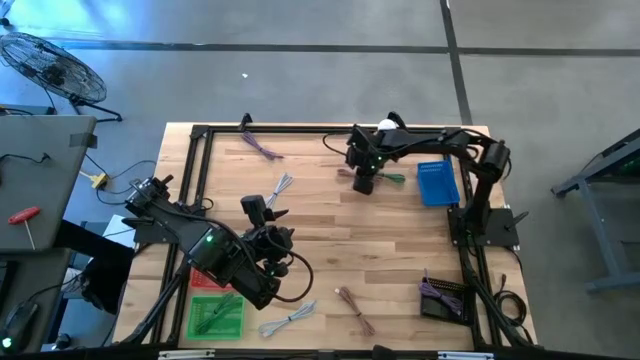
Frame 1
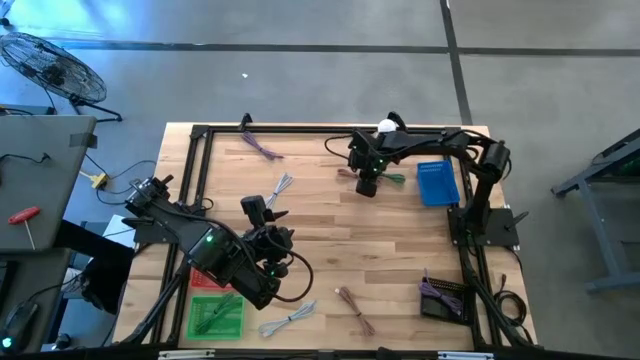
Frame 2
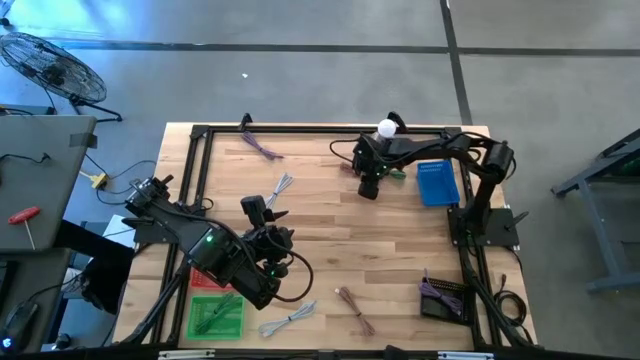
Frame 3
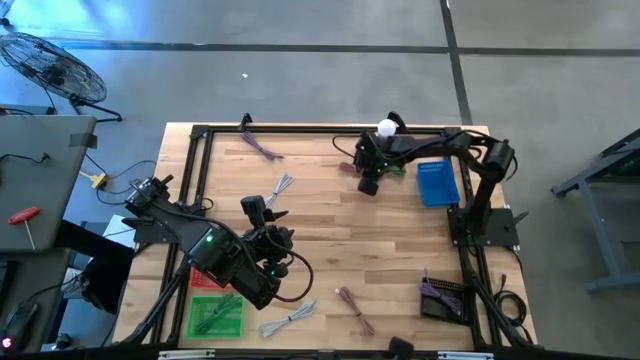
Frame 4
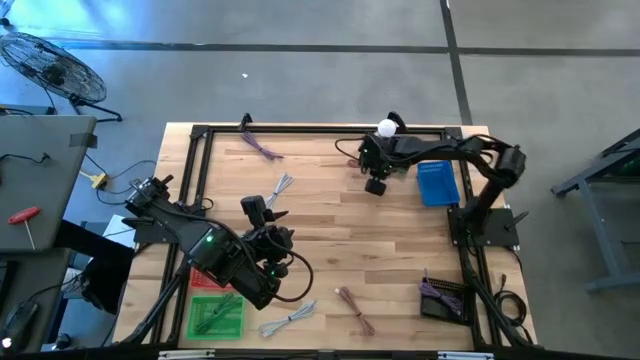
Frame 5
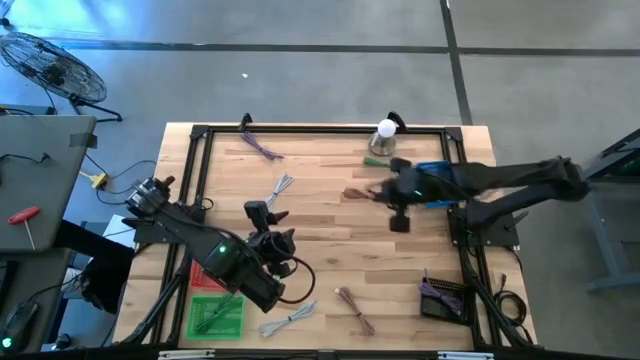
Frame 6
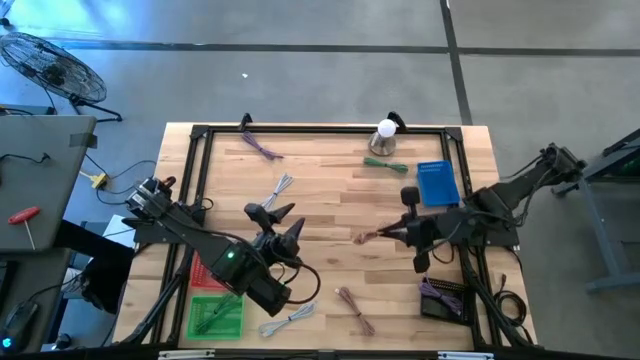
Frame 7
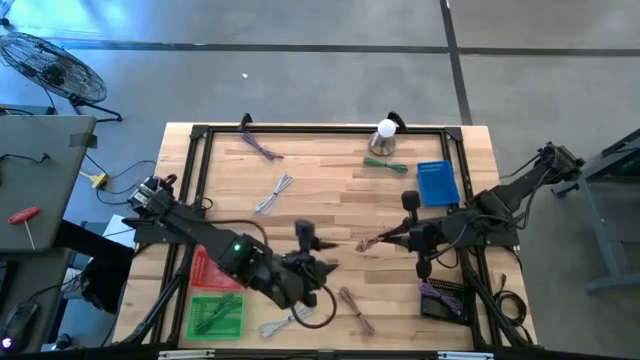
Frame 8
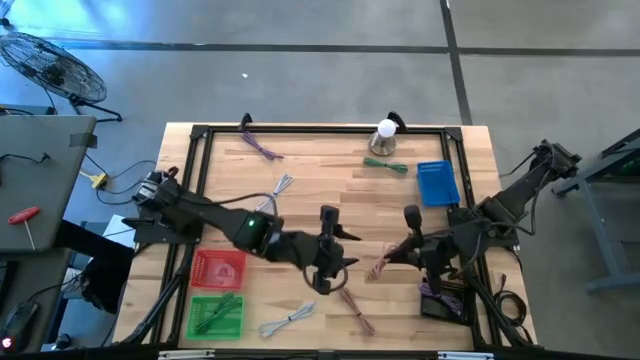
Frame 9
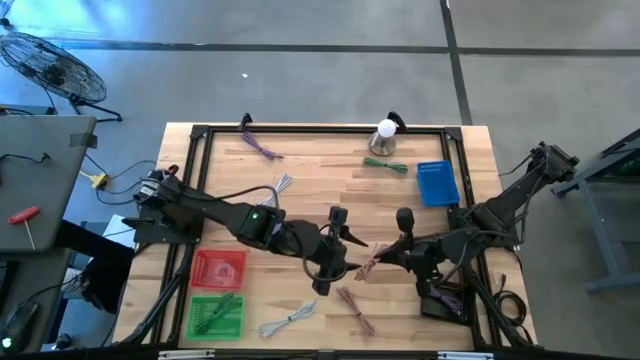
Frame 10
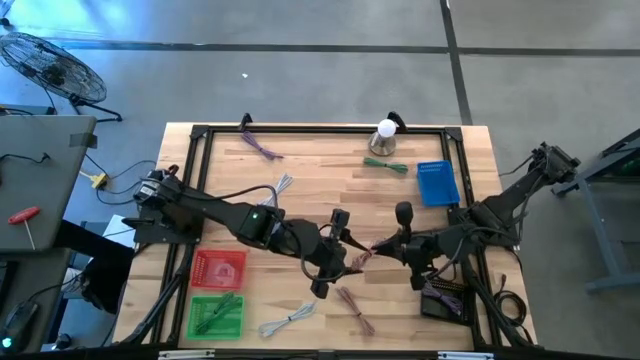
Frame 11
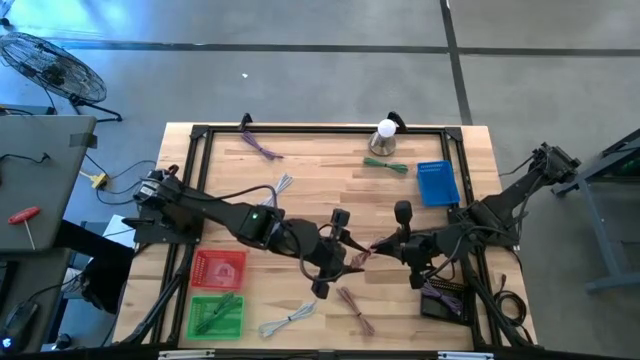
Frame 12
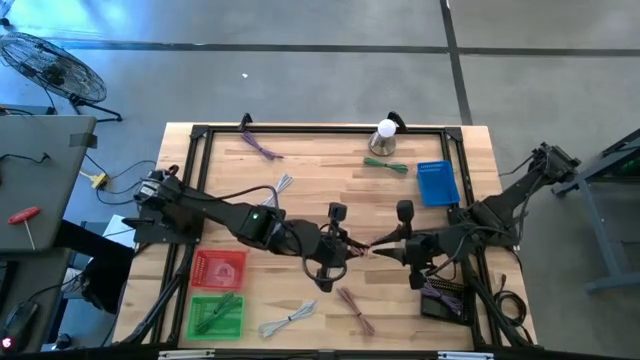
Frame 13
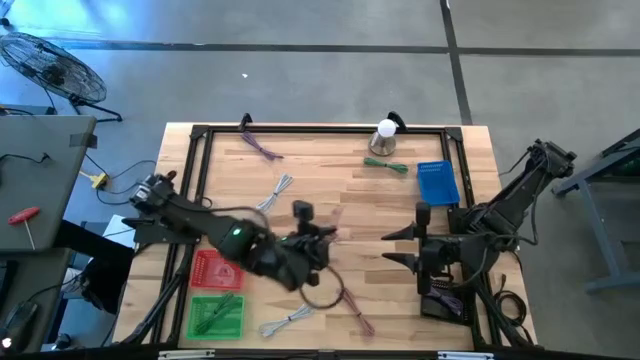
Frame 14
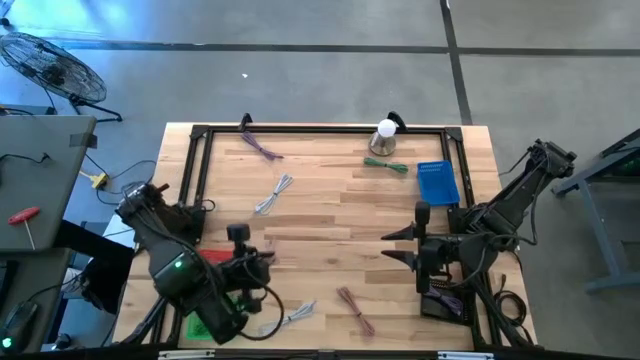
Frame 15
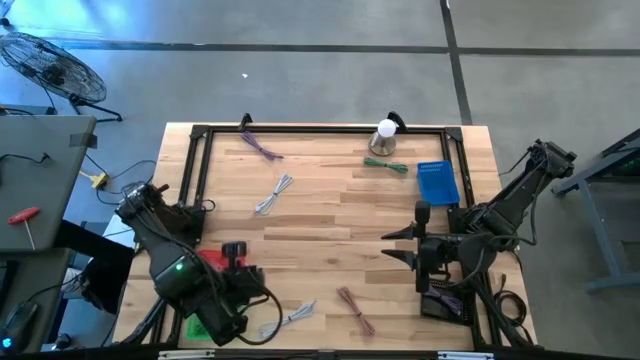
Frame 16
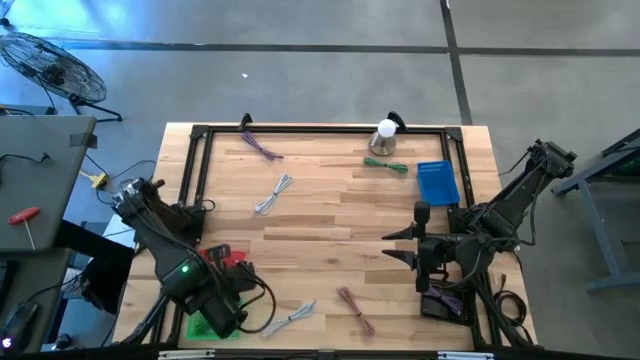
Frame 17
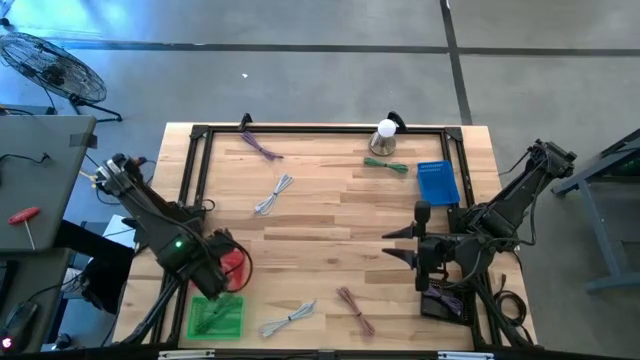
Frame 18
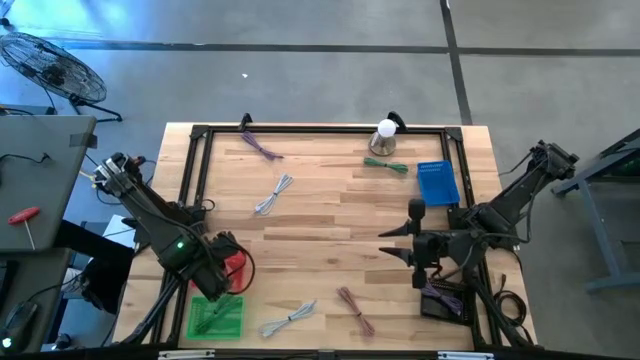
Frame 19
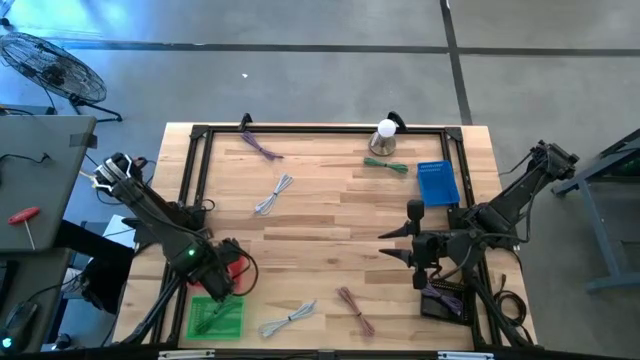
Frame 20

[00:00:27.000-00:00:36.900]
Task: Pick & Place USB Port
Put the top pink charger cable into the red bin

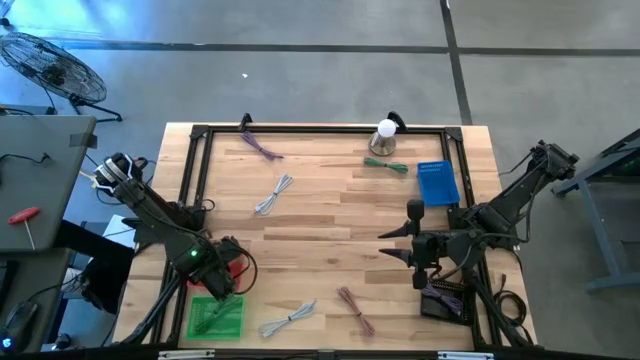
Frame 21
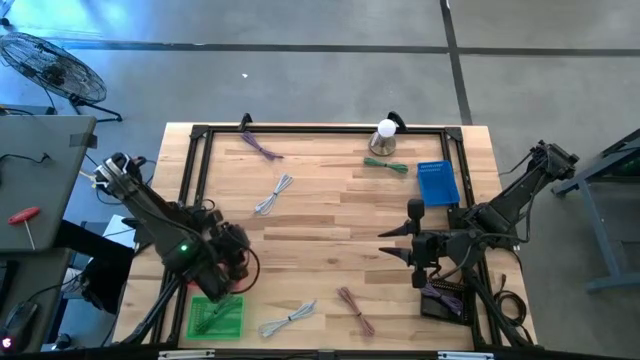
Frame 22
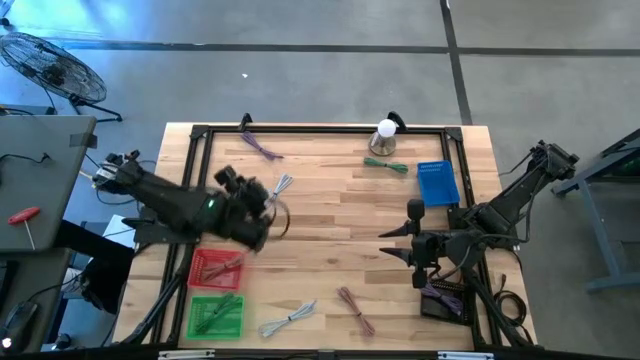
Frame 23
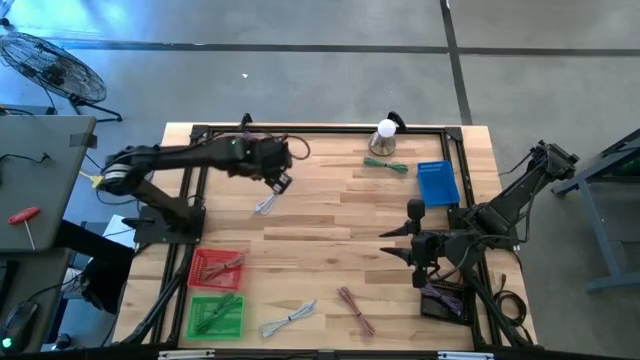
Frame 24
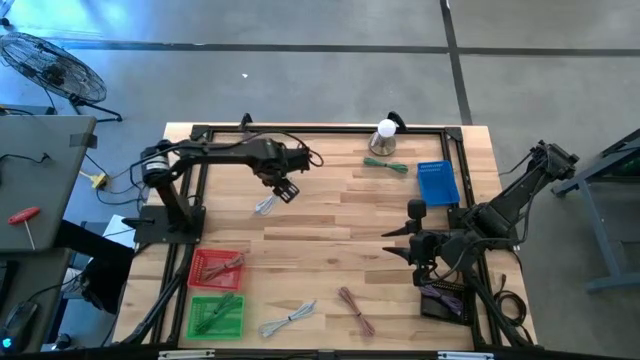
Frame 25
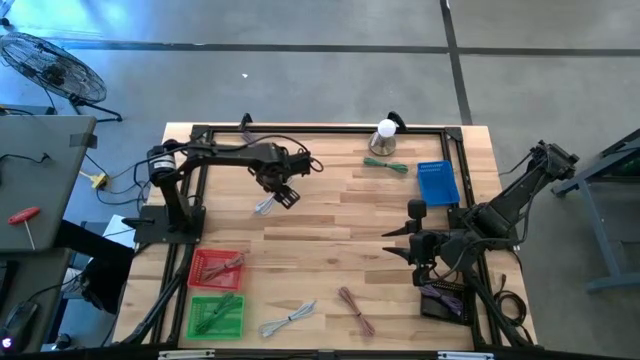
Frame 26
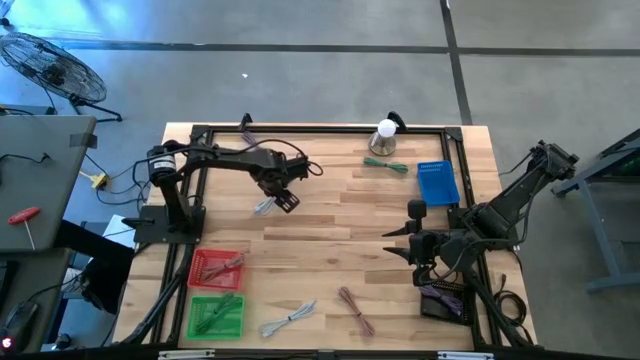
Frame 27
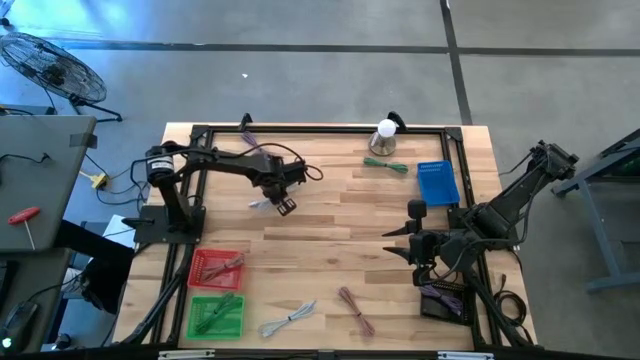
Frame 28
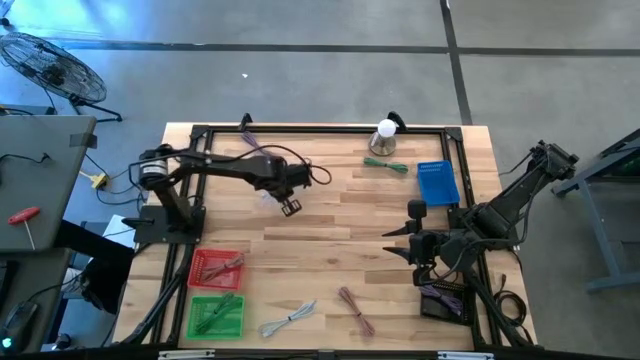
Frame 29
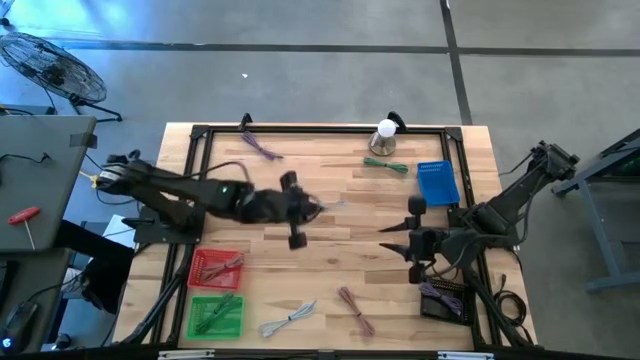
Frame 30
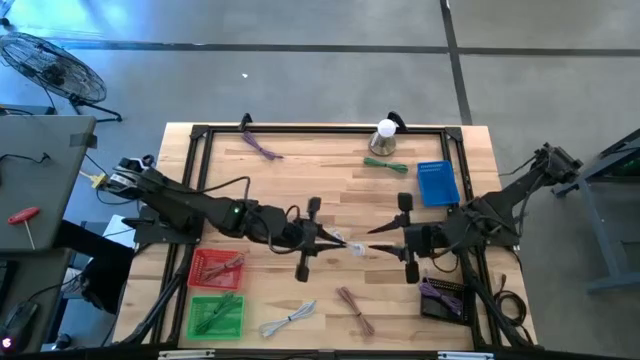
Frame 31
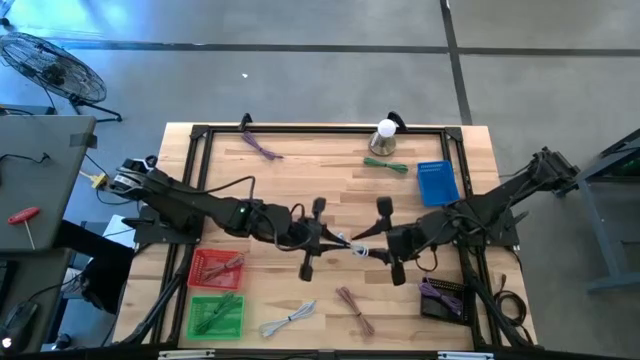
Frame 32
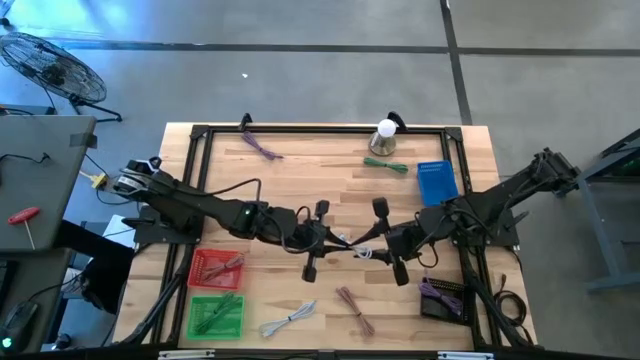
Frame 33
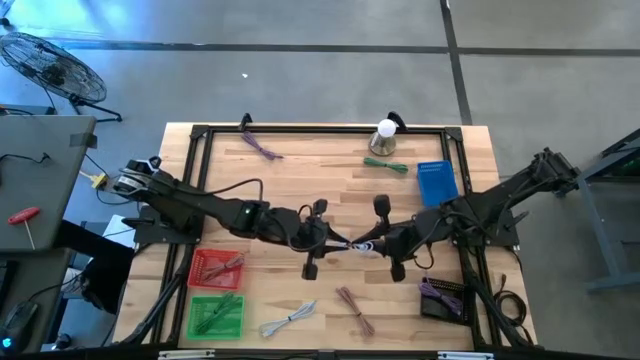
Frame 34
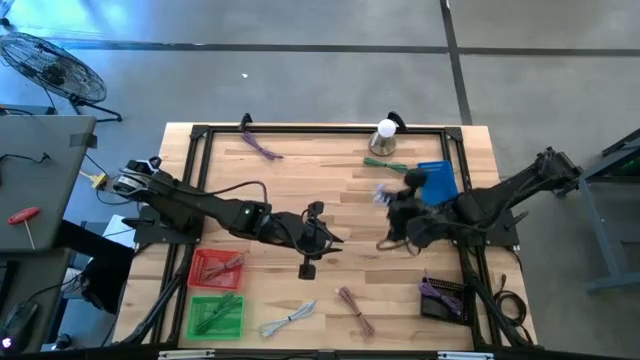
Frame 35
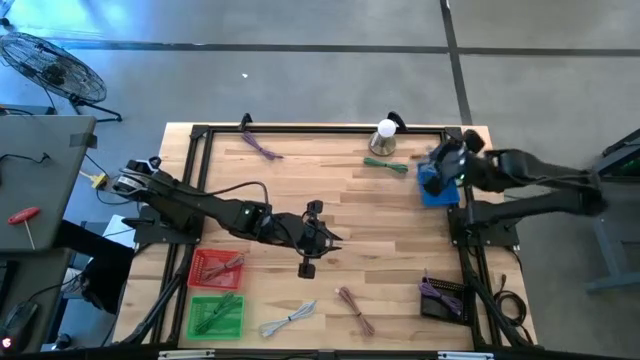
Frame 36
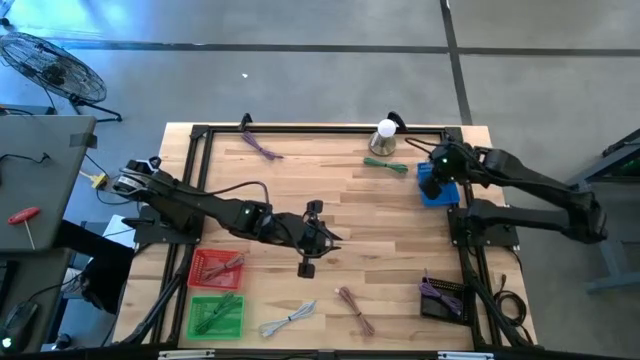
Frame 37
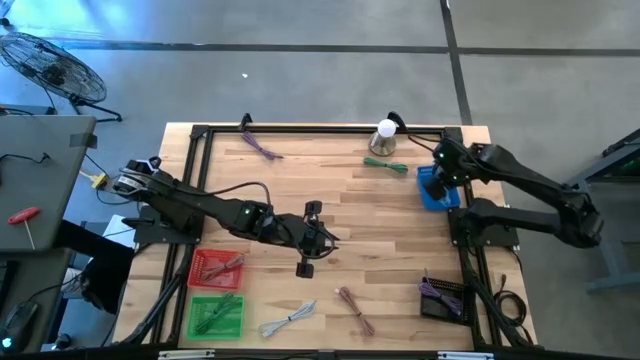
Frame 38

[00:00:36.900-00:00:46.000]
Put the top light blue charger cable into the blue bin

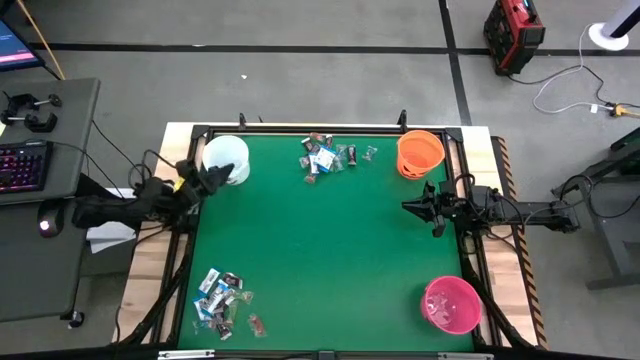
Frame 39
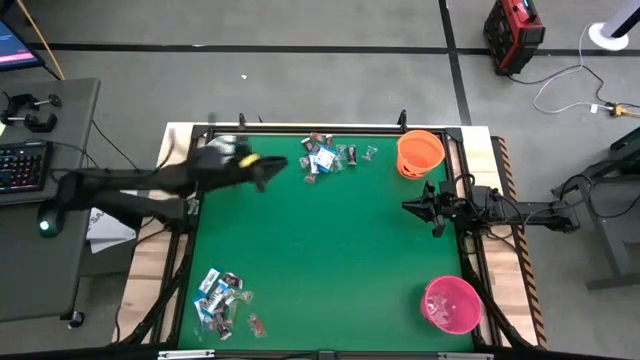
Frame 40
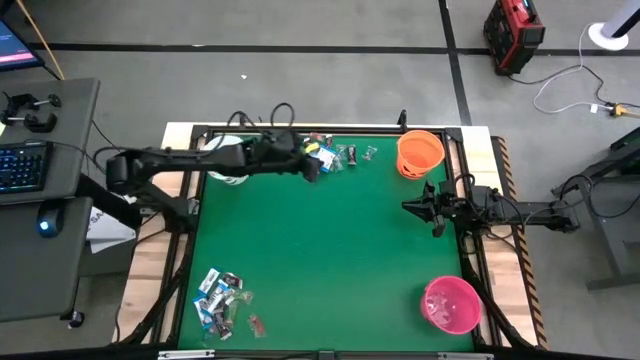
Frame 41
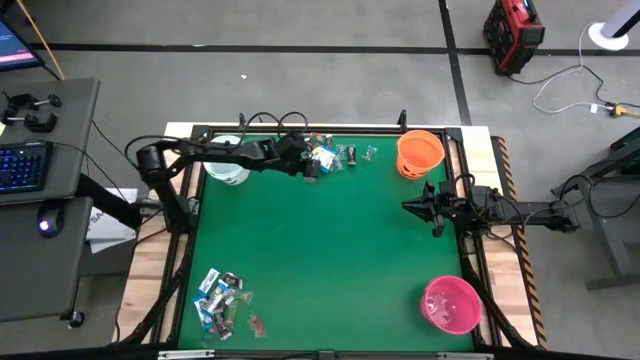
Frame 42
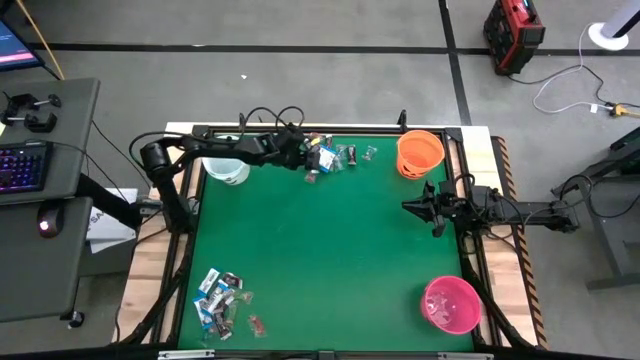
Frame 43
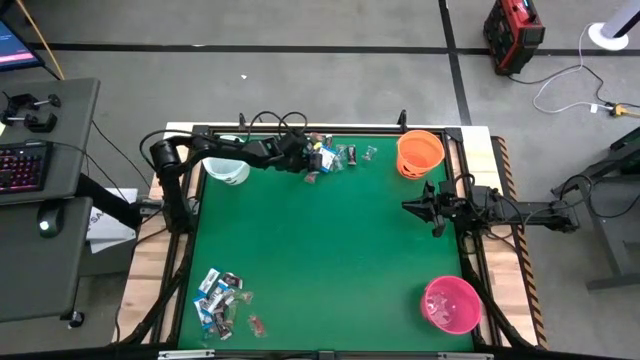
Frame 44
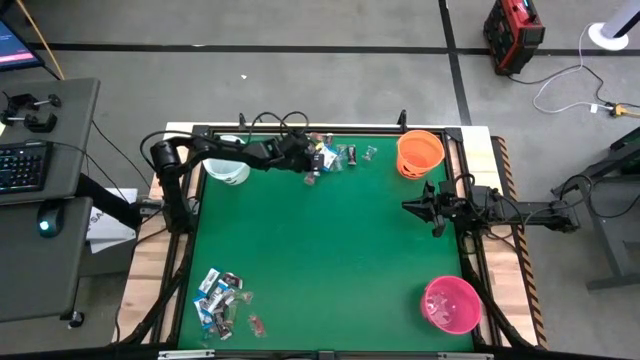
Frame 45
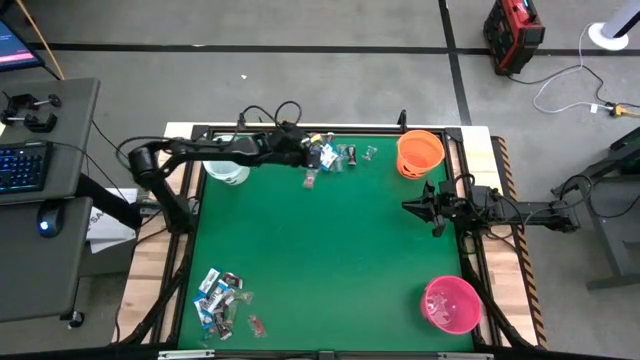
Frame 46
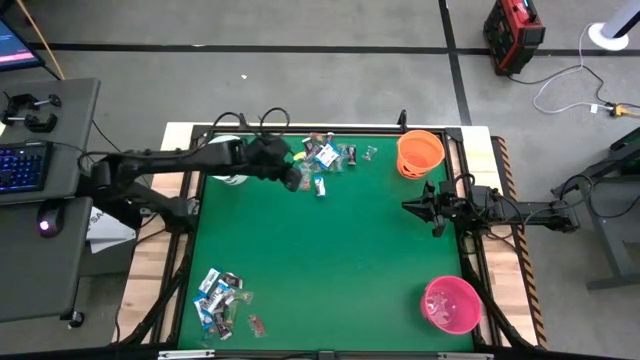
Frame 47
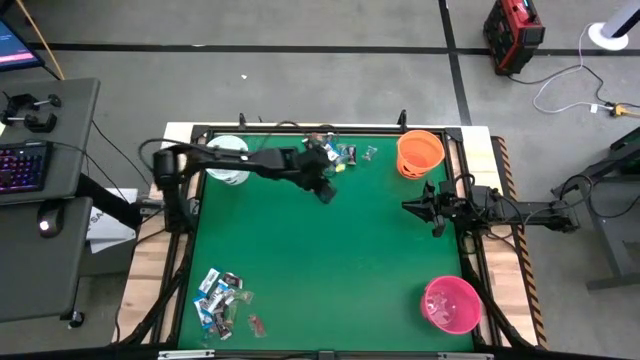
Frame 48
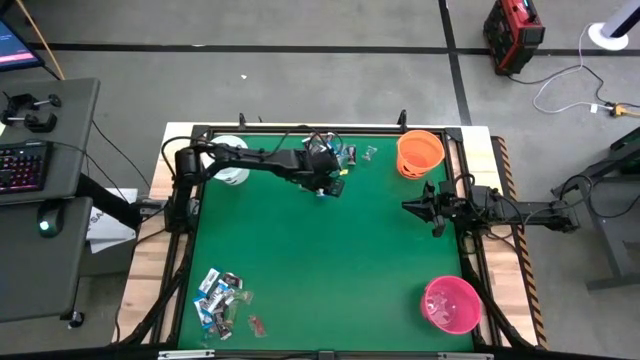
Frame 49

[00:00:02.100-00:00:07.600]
Task: Sort candy by brand, put in halloween buckets
Put the white chocolate bar into the white bucket
